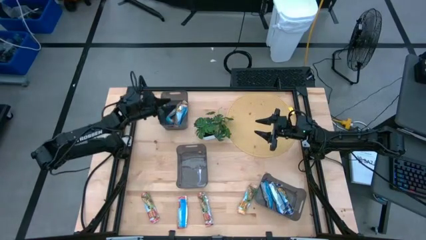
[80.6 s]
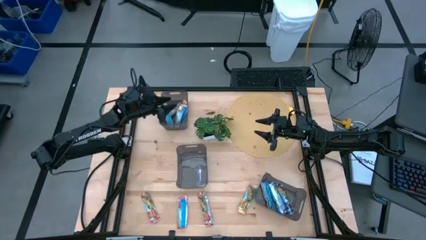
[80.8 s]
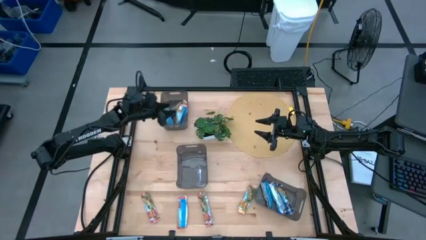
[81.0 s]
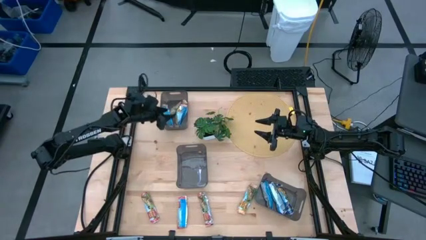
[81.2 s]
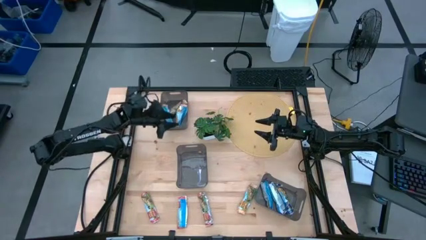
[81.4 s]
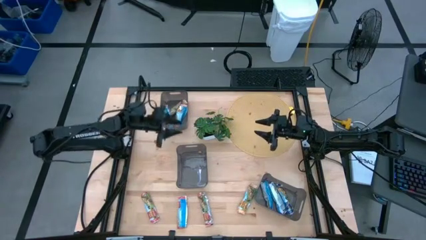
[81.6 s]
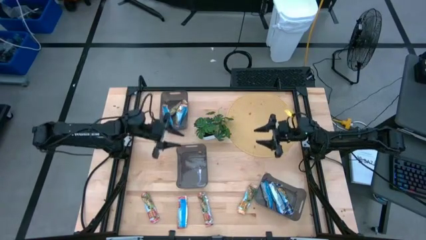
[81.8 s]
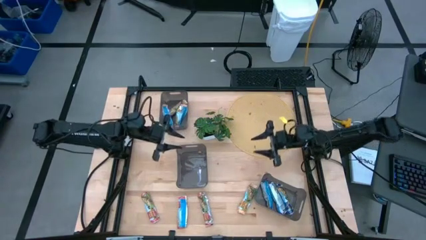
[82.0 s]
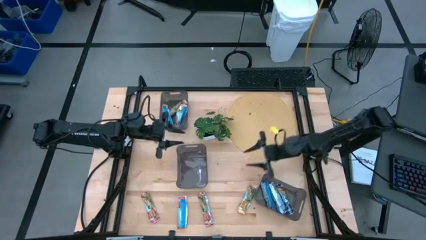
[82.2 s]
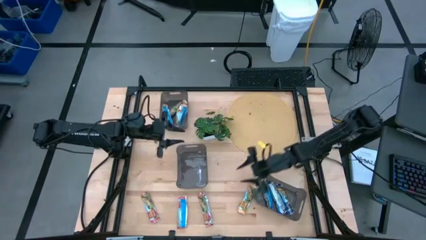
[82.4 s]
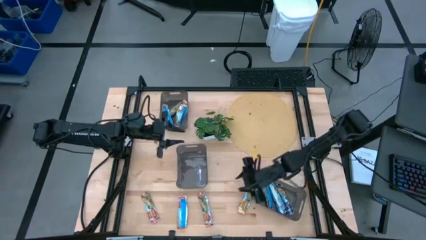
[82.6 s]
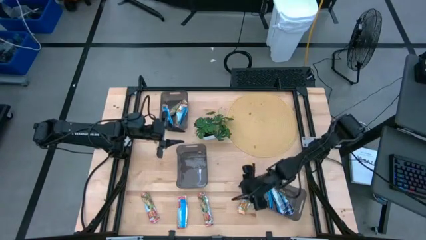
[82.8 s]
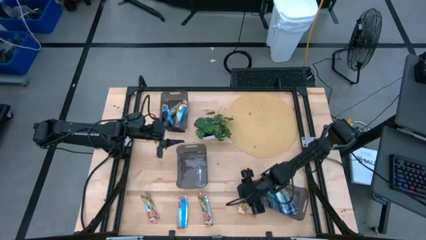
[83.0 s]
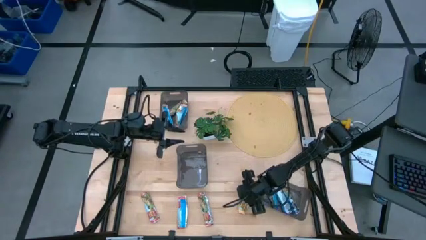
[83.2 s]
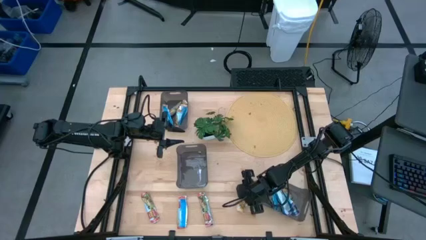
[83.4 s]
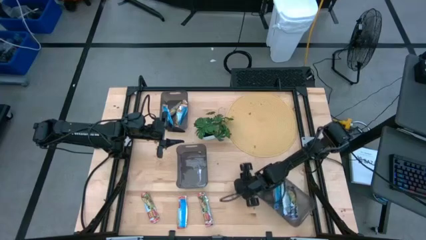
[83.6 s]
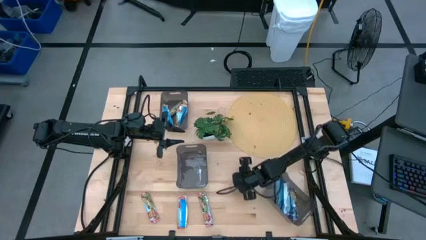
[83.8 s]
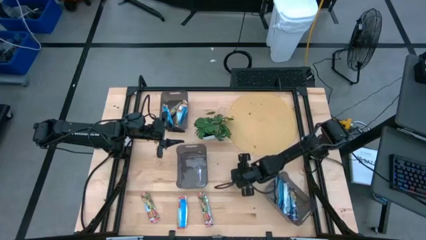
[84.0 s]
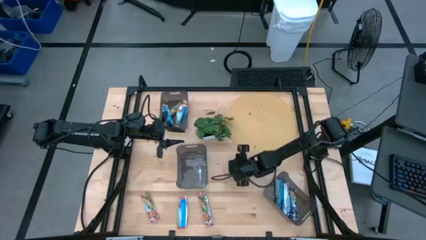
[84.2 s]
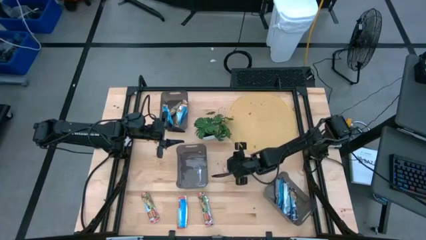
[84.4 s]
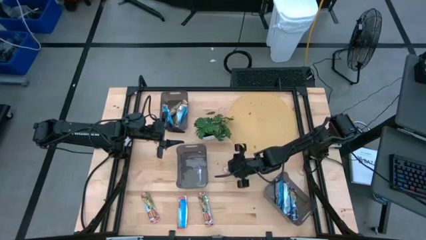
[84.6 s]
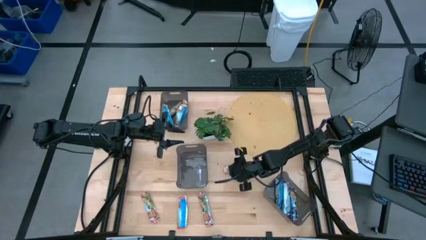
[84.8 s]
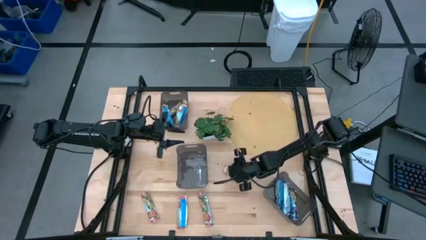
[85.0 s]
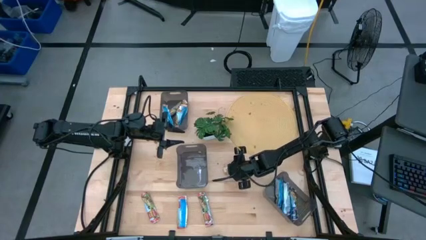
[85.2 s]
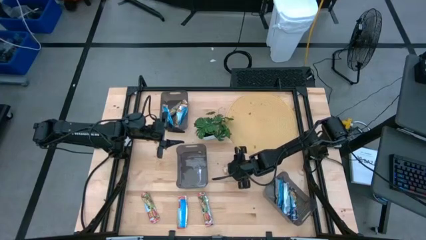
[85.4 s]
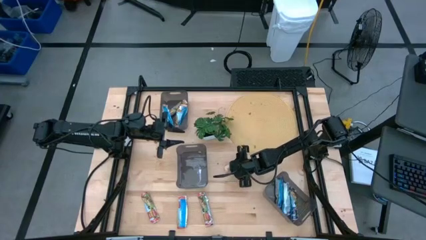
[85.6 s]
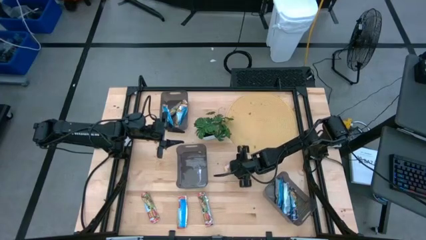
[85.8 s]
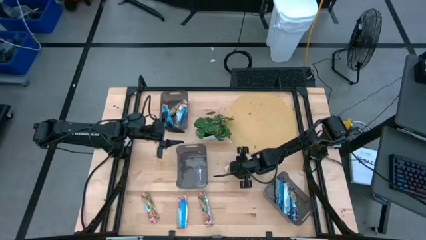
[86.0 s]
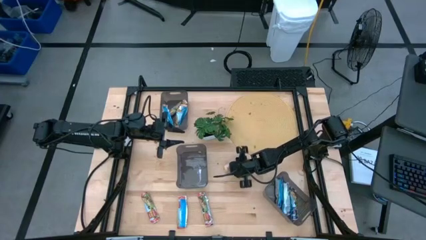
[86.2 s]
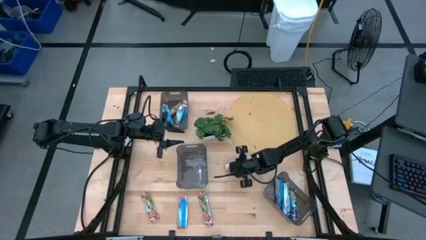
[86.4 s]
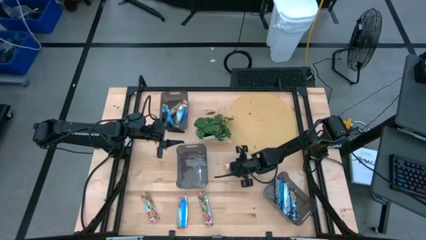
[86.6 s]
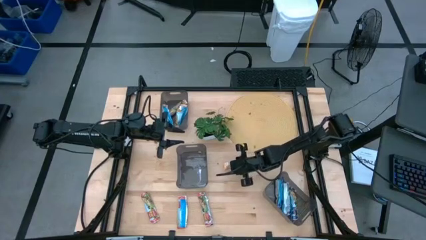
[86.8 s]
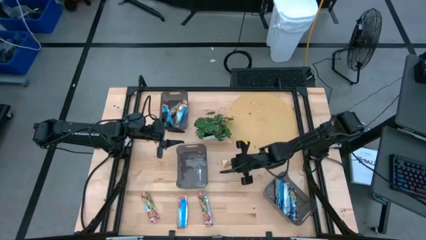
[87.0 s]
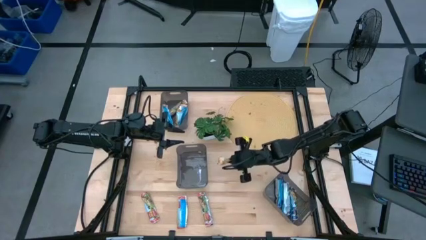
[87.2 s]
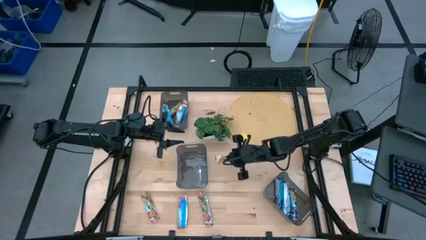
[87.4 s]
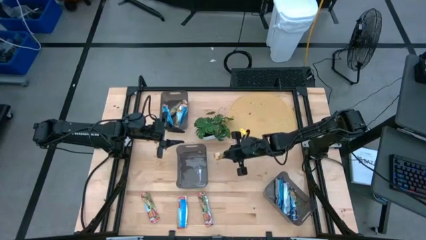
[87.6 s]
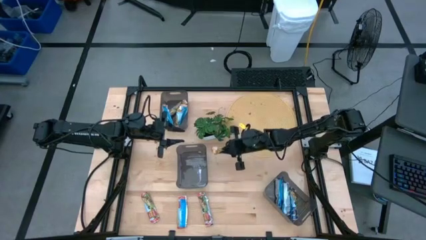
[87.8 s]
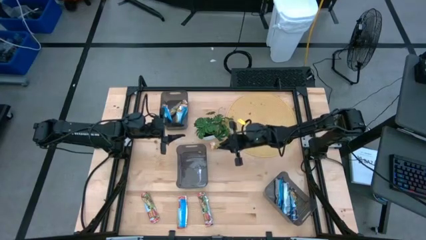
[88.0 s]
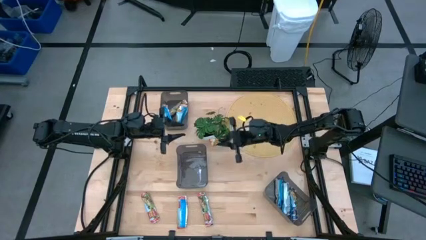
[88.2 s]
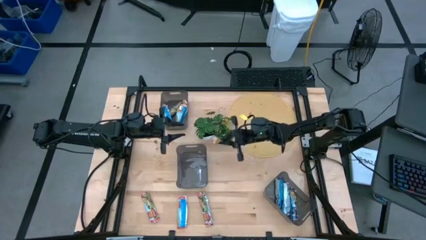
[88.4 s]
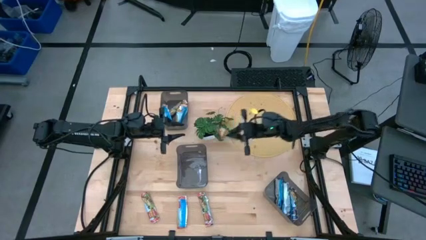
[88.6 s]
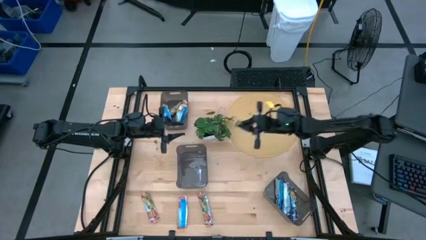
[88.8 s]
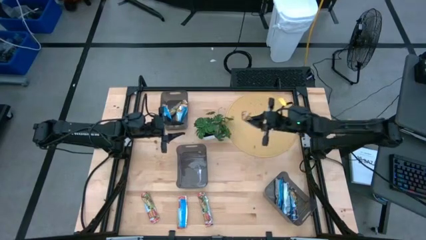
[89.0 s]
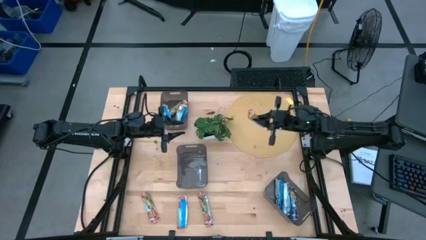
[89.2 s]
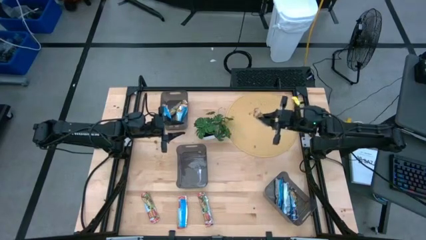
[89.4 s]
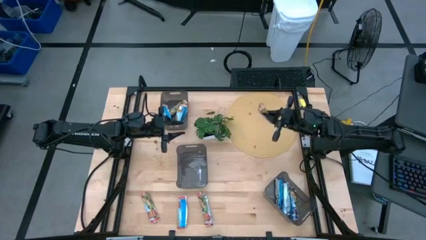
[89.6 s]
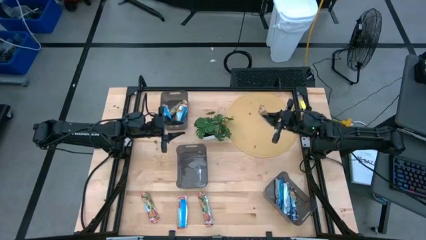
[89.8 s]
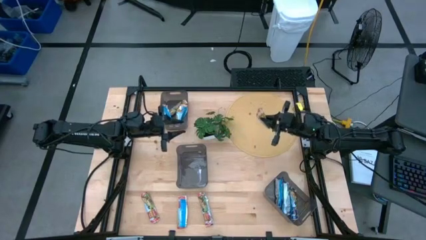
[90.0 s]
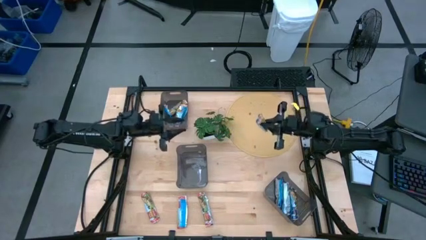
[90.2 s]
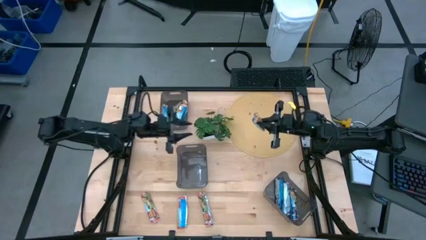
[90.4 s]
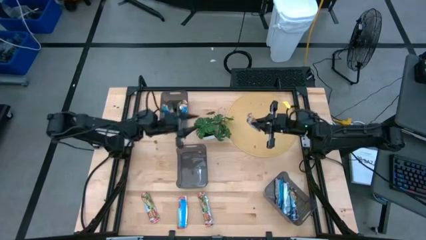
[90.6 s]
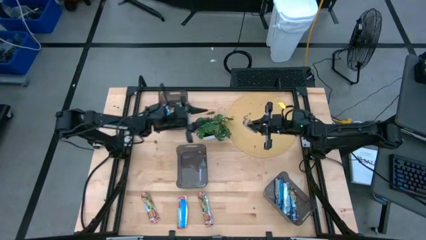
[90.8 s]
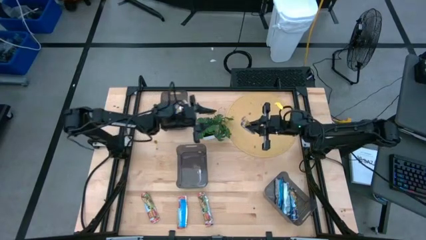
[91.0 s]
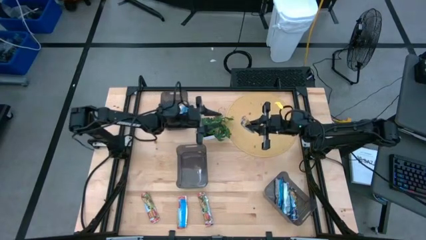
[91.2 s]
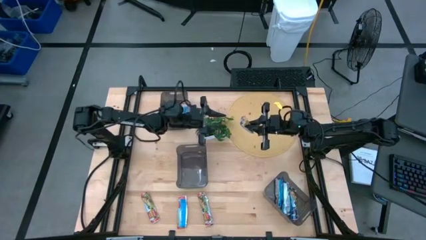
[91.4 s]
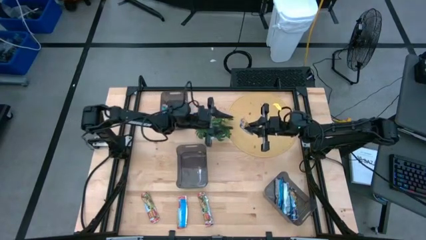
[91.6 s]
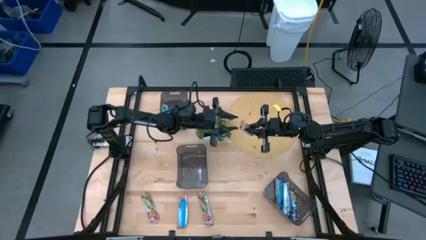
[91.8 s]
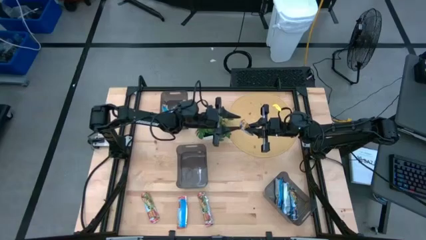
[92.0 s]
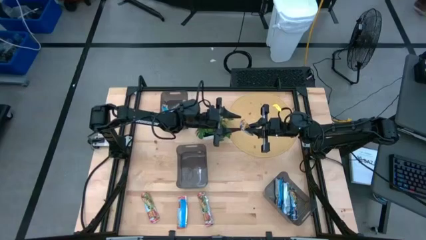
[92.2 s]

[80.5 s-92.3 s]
Task: Pick and place Granola Bars by type
Put the orange granola bar into the top black bin

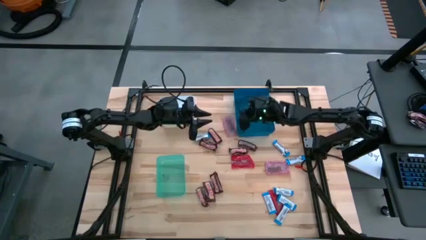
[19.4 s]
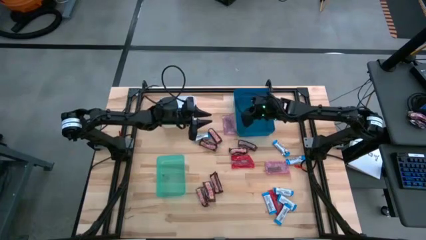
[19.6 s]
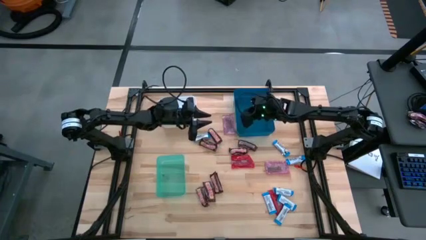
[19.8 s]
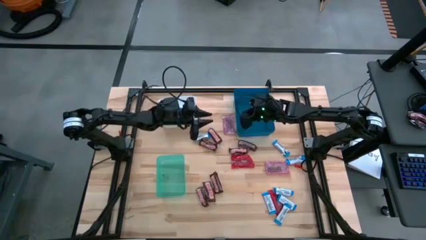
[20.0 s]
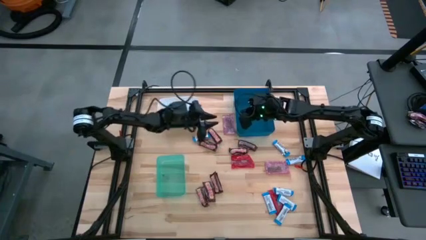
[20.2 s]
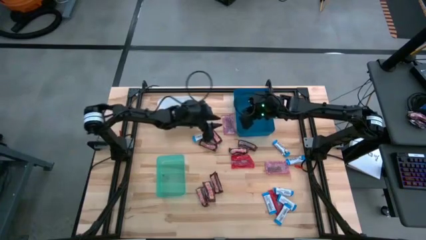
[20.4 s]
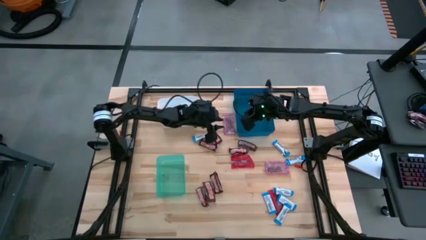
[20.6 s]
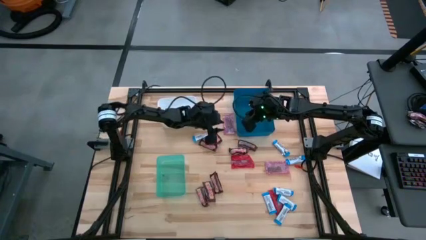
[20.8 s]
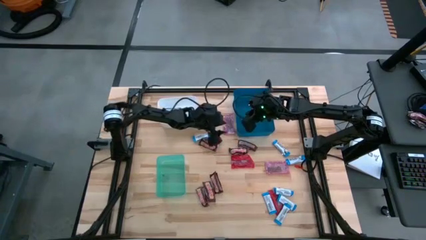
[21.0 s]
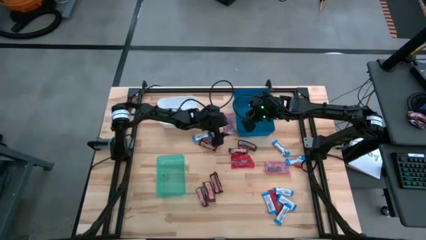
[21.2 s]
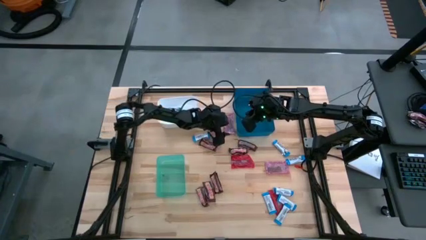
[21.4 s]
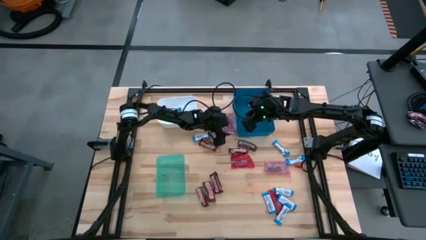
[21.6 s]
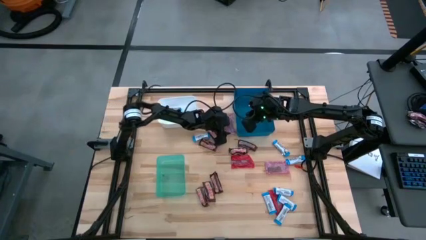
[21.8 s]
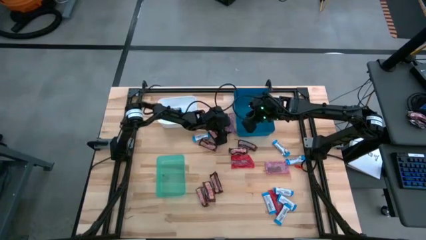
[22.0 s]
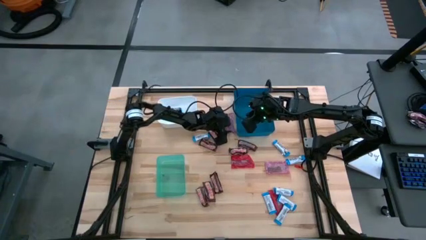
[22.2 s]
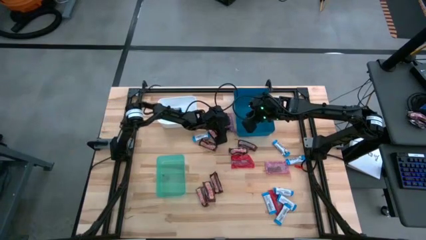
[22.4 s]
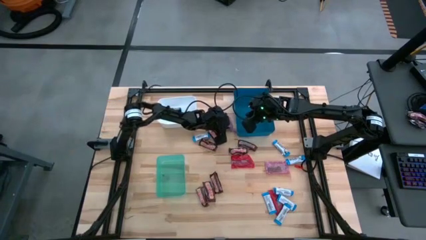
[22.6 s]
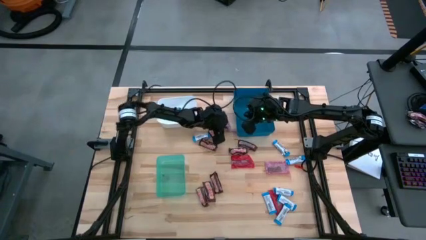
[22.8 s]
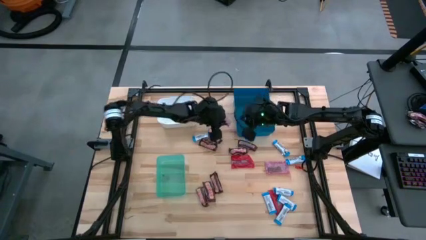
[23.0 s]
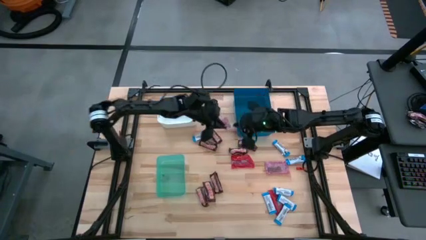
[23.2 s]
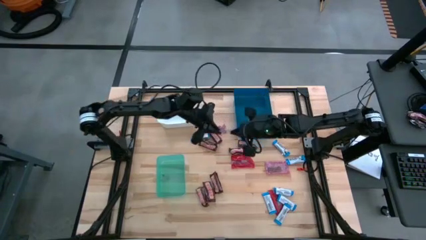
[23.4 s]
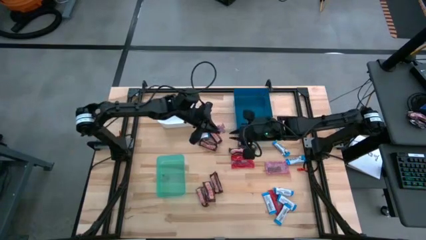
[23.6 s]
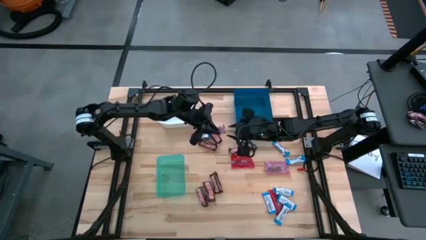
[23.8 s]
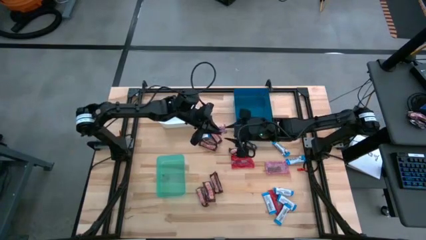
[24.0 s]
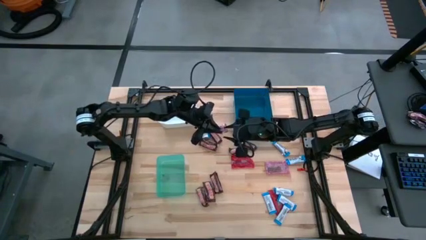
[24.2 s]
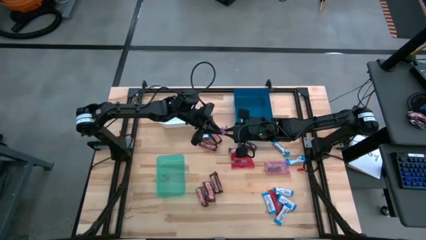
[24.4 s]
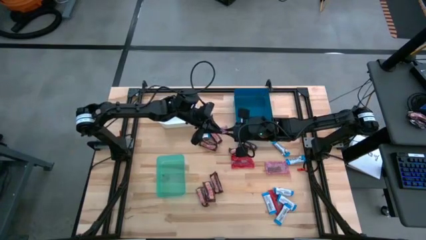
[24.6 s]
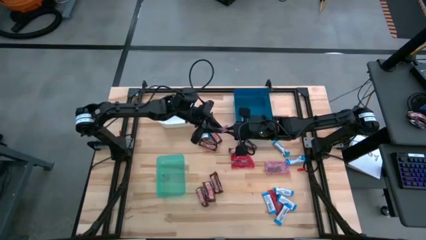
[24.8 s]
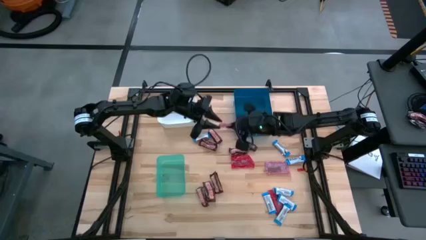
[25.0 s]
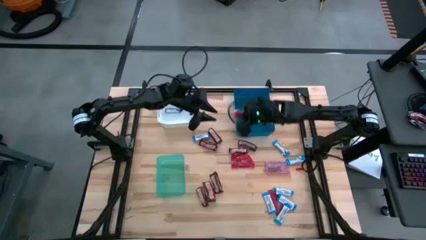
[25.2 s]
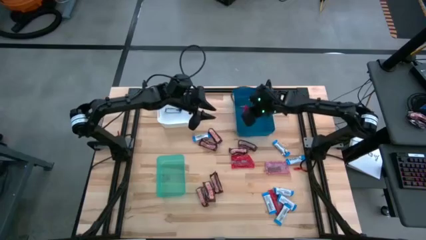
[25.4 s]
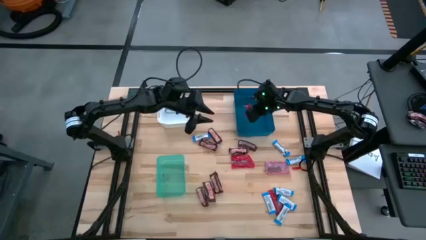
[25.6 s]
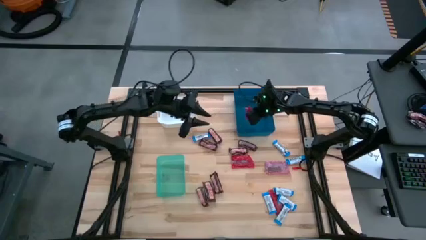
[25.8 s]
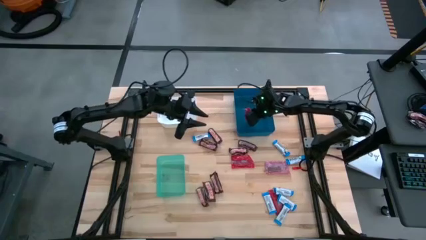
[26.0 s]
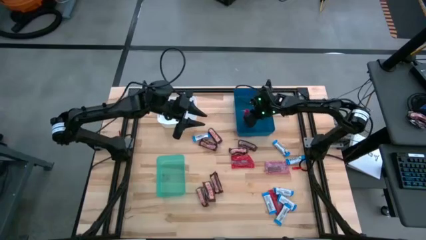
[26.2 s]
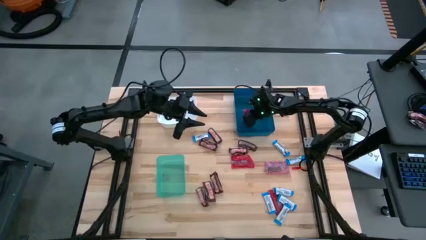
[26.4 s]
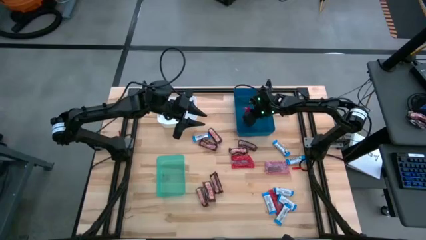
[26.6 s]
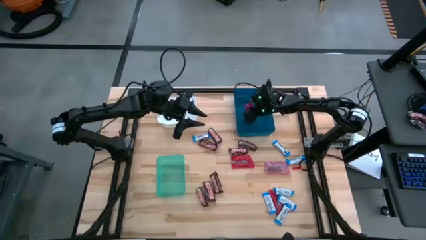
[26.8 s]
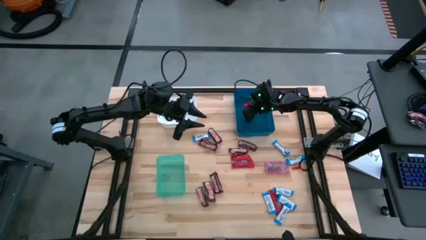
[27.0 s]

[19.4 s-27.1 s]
Task: Sort candy
Put the red candy into the blue bin
